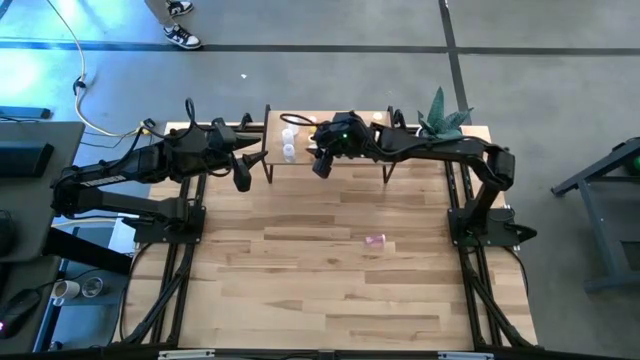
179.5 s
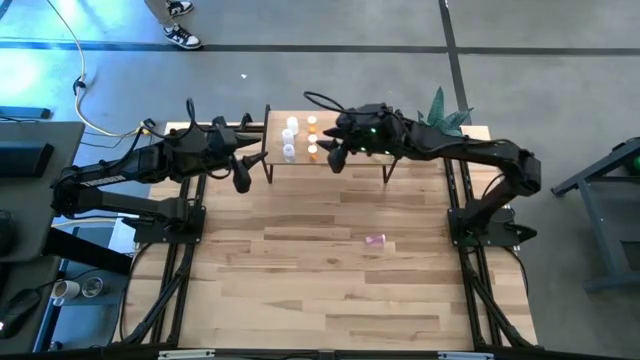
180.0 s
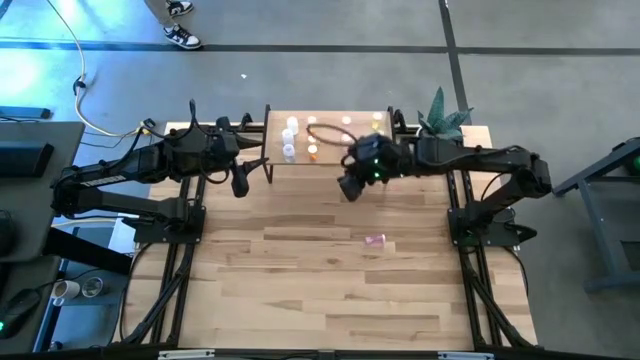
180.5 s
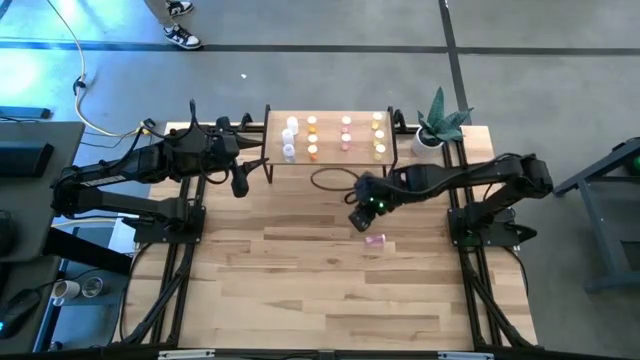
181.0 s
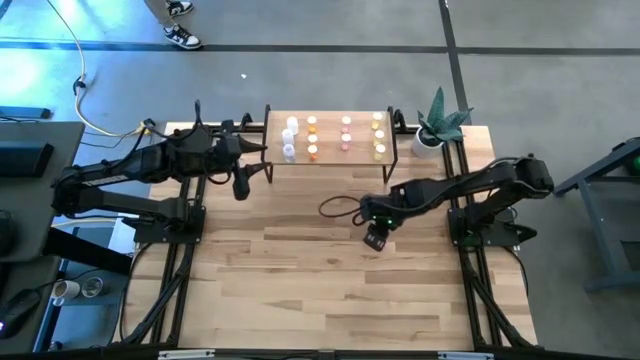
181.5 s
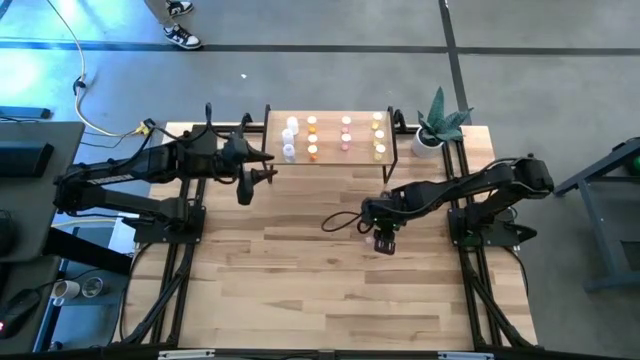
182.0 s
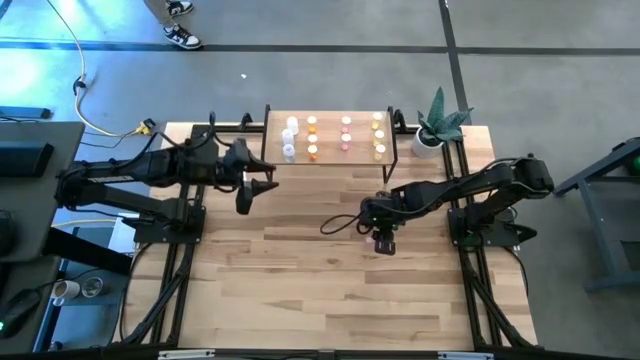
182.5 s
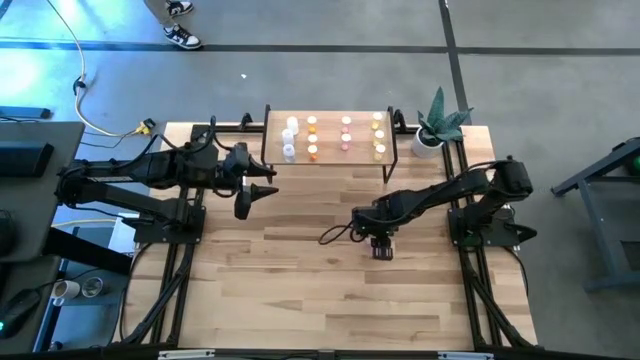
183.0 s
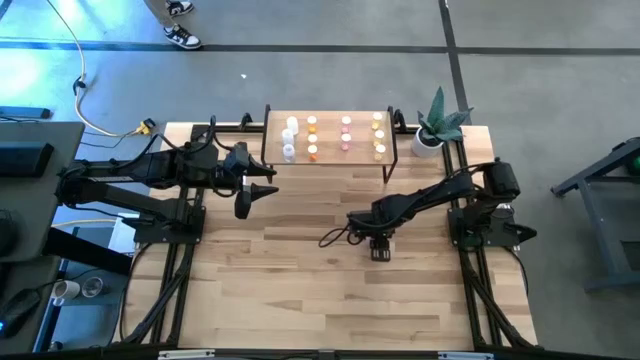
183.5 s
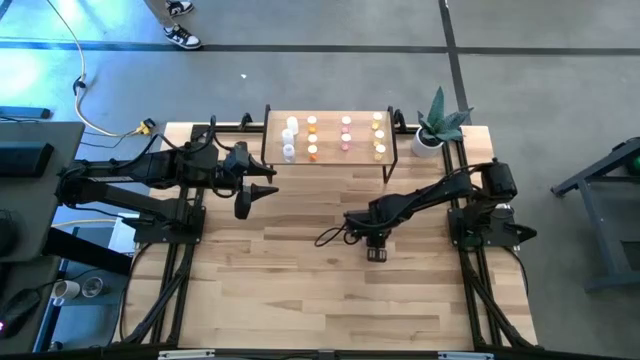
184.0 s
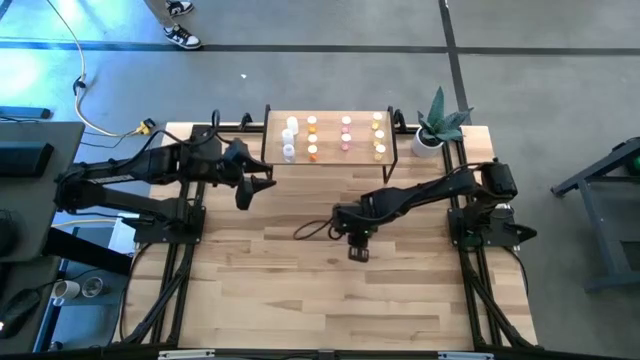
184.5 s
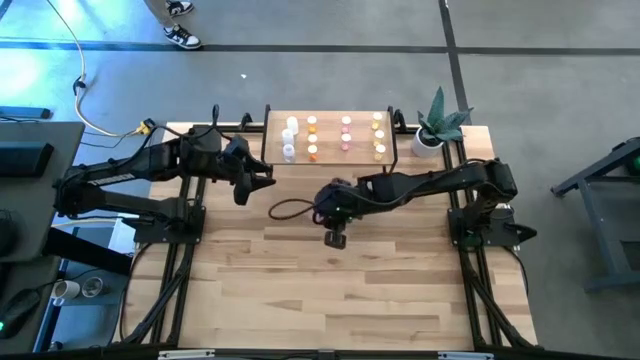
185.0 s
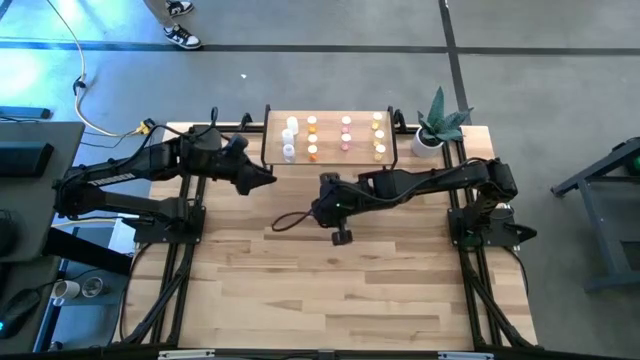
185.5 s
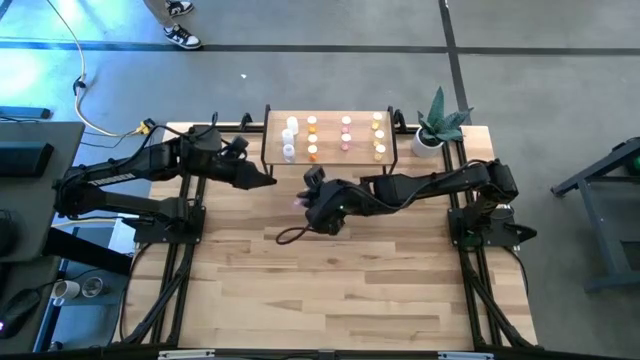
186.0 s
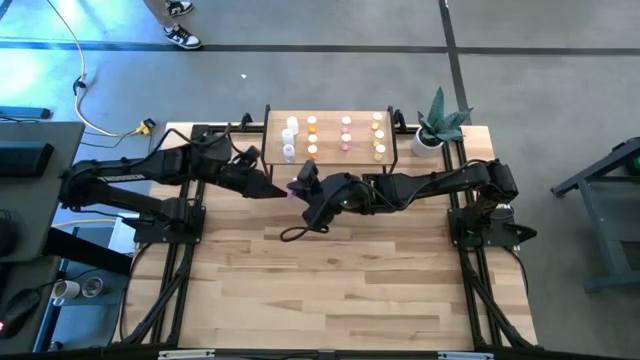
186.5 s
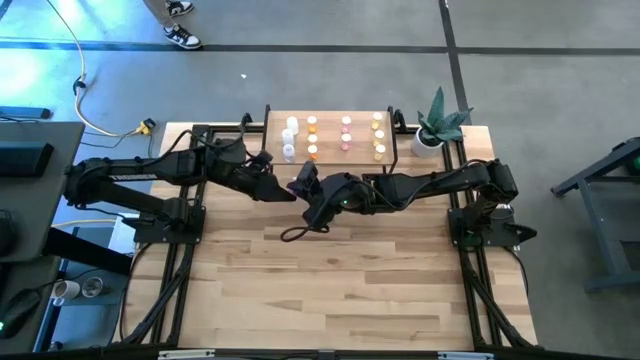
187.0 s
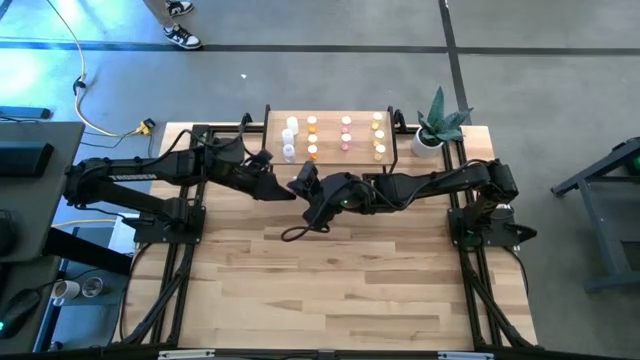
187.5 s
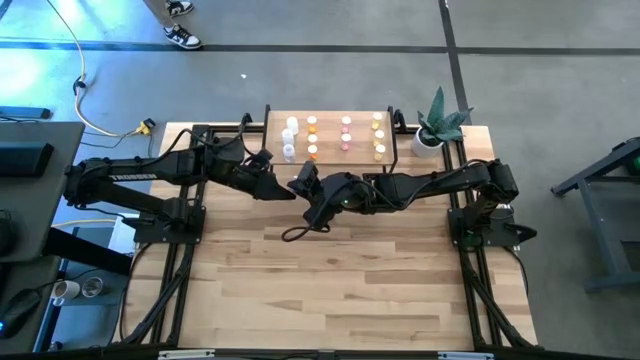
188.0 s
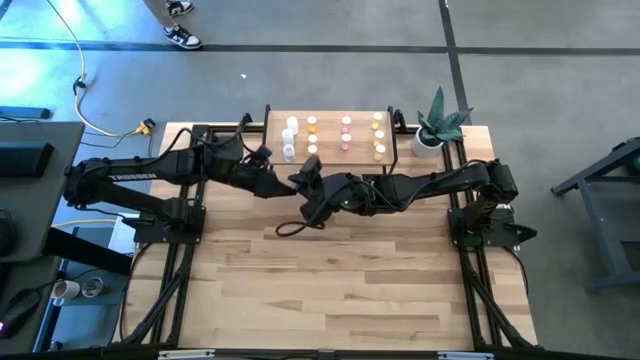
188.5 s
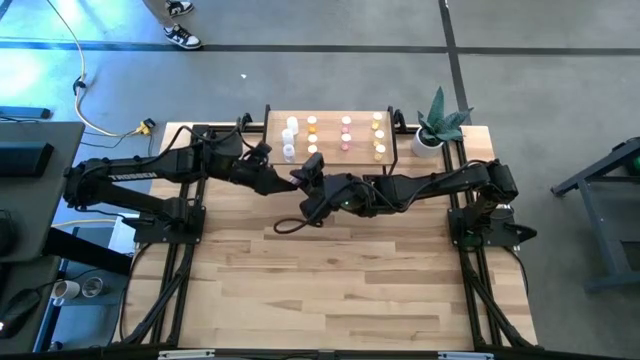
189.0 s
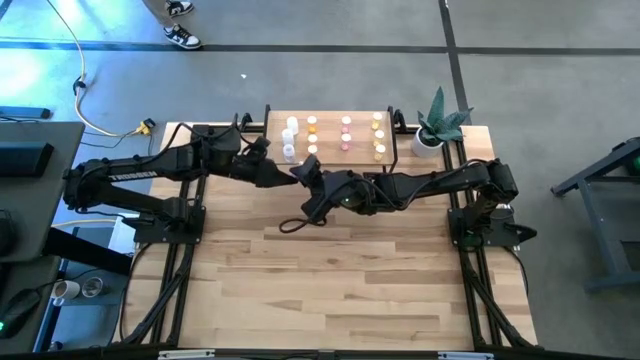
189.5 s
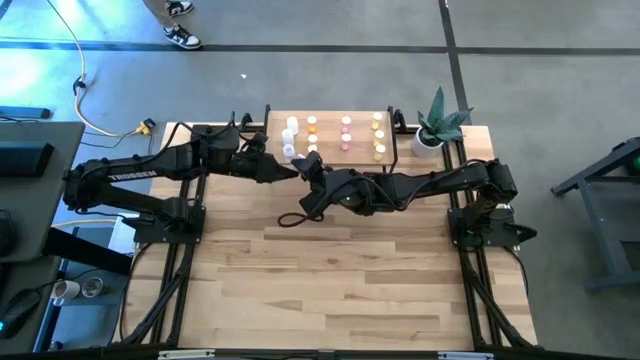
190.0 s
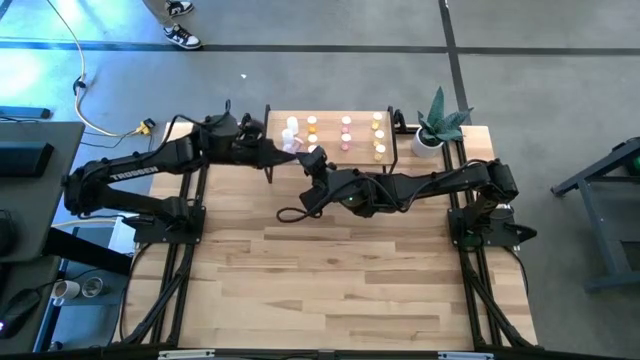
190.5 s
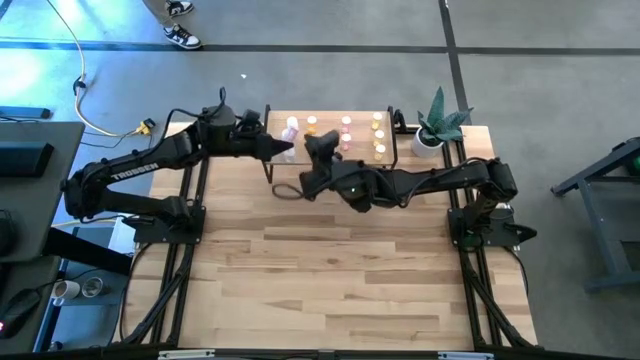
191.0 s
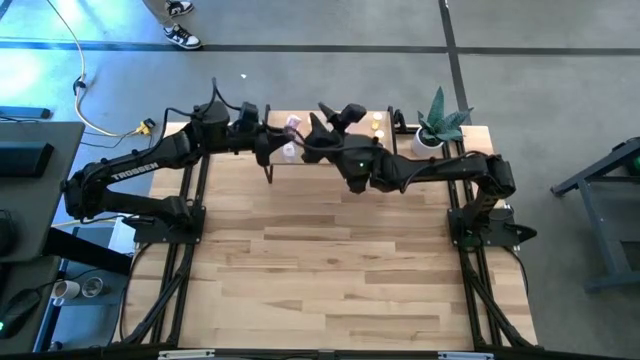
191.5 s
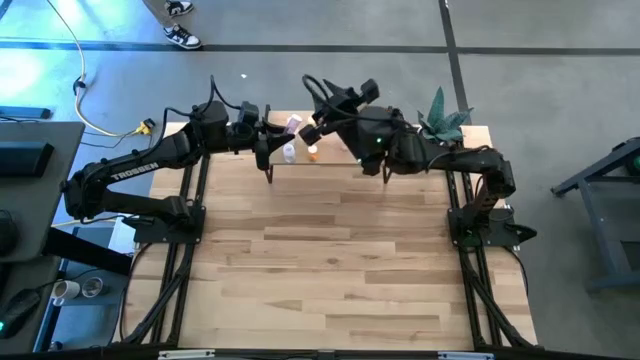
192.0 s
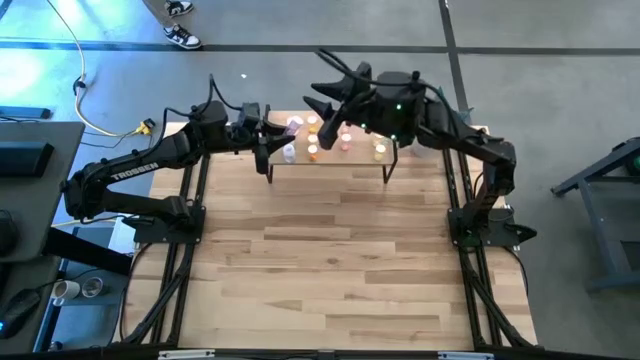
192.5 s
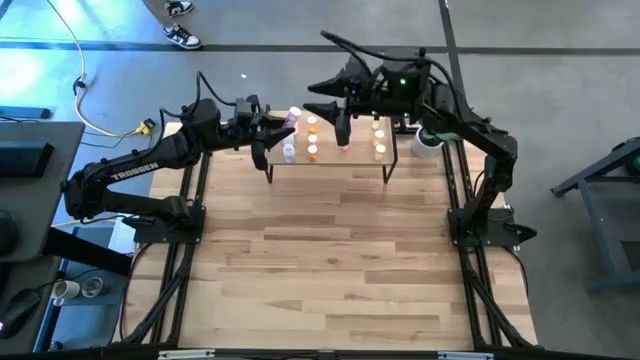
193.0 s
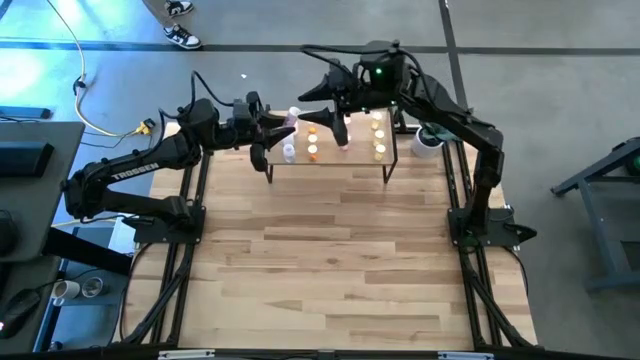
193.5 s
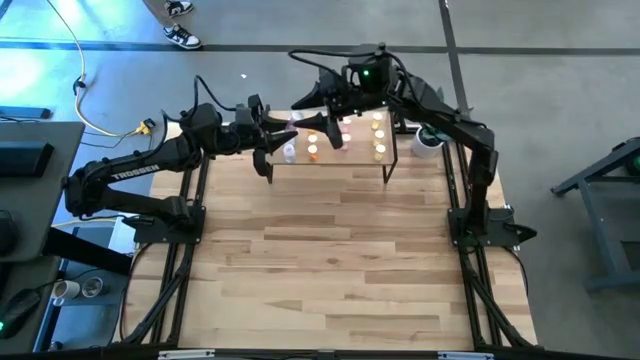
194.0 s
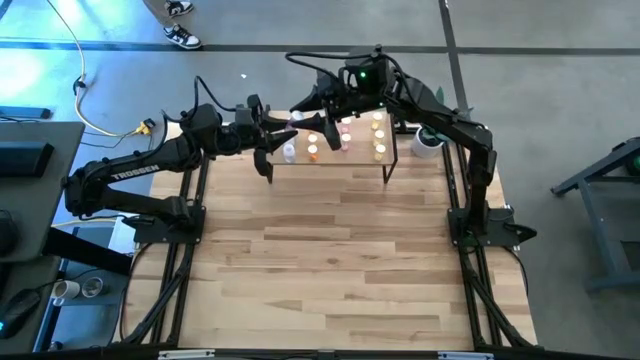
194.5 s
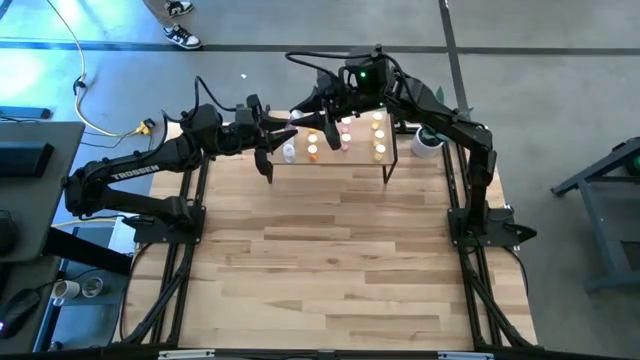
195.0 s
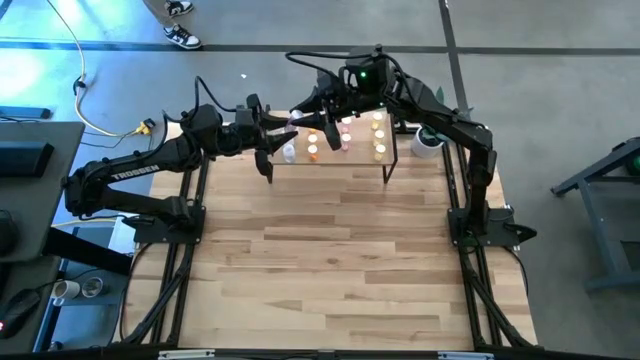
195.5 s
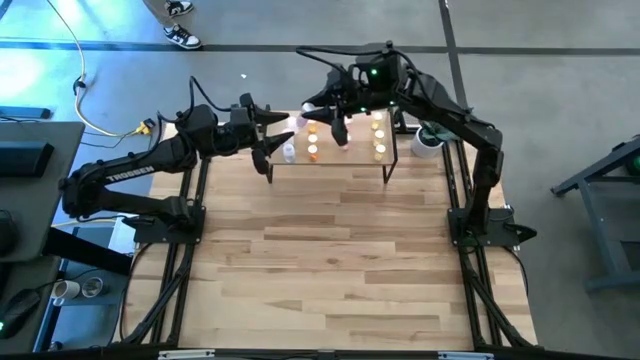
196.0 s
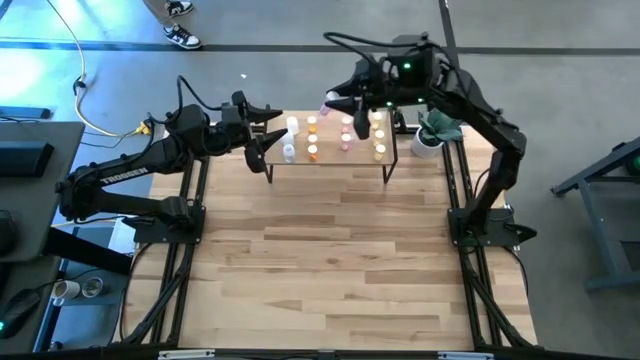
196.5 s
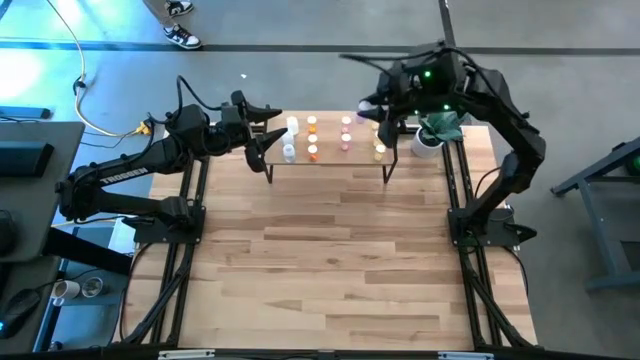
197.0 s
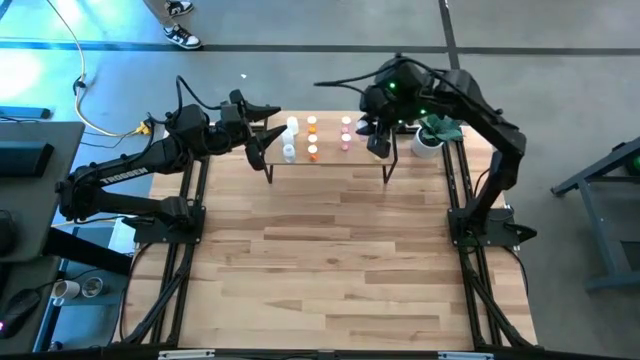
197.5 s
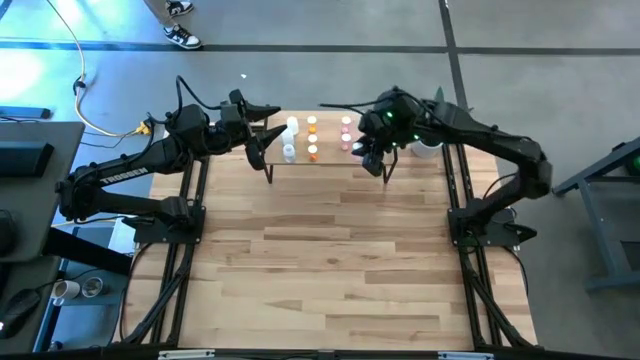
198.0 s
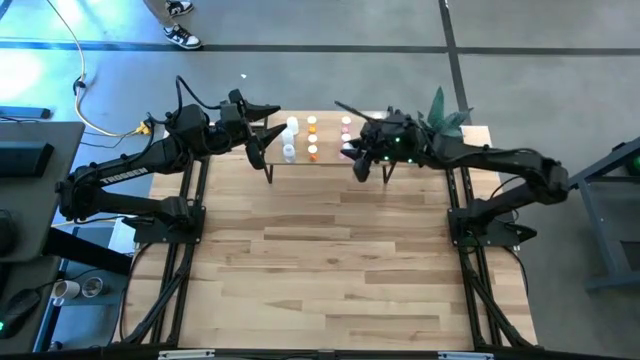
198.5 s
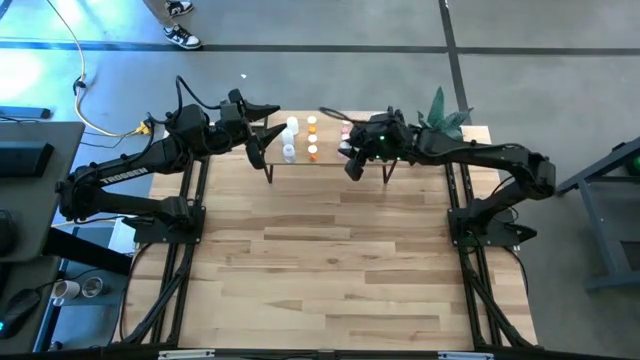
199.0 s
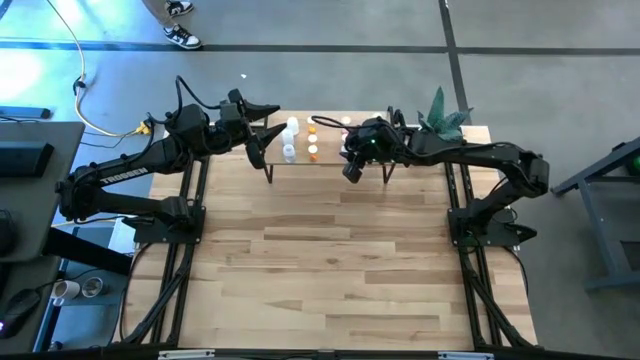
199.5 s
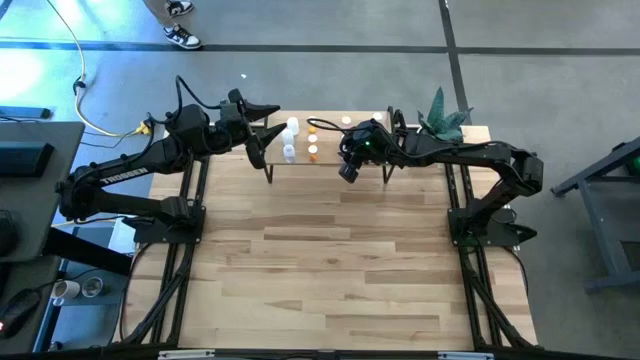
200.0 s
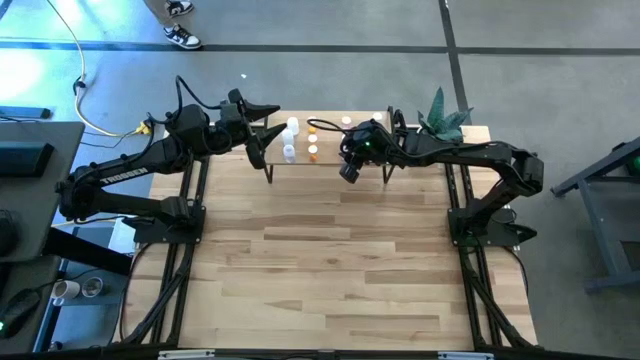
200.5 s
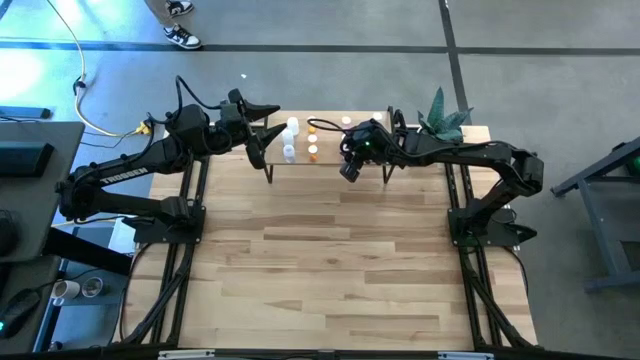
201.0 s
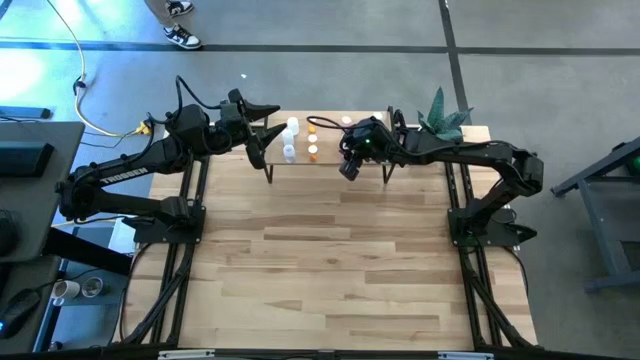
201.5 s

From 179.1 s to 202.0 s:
Task: Pick and place medicine bottles onto shelf by color
Put the pink pill bottle aligned with the other pink pill bottles on the shelf
